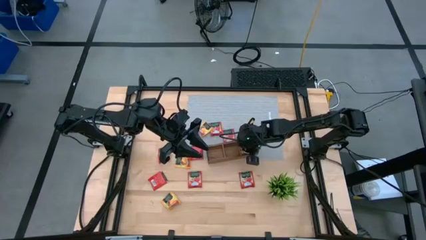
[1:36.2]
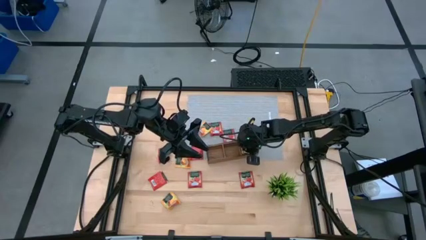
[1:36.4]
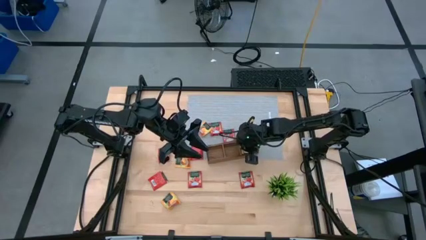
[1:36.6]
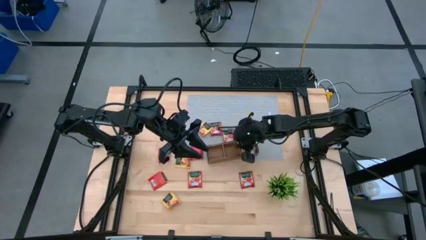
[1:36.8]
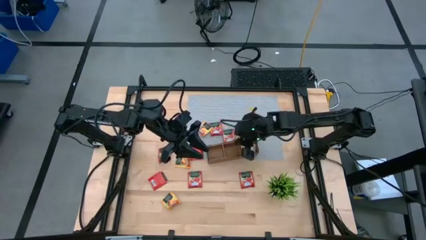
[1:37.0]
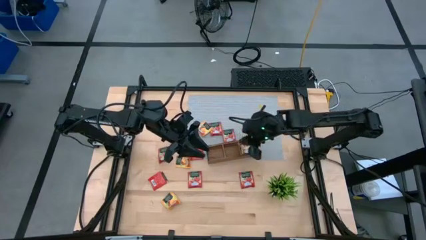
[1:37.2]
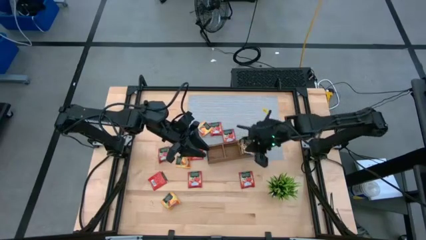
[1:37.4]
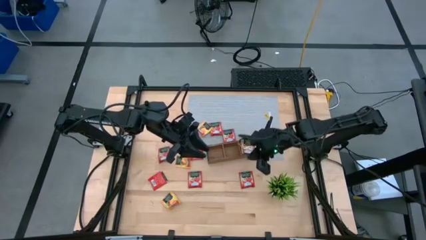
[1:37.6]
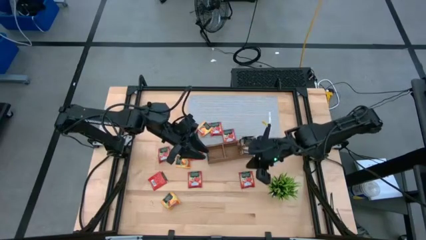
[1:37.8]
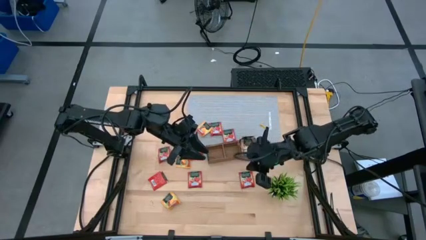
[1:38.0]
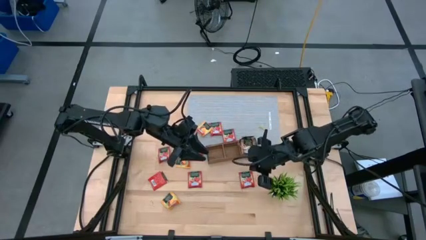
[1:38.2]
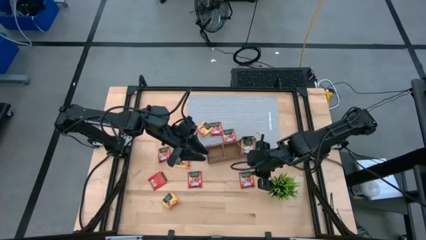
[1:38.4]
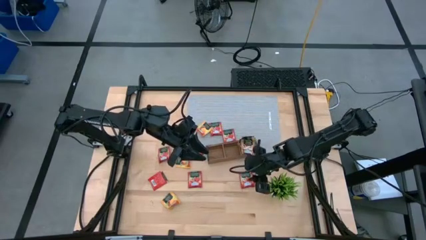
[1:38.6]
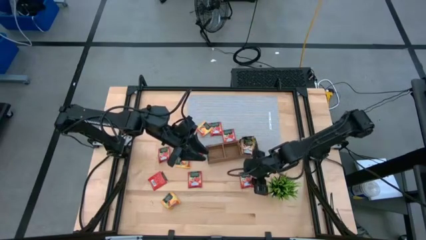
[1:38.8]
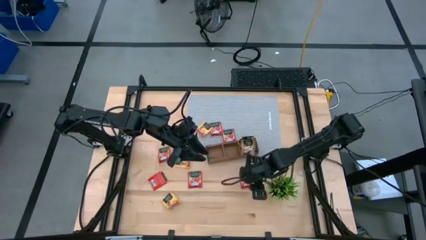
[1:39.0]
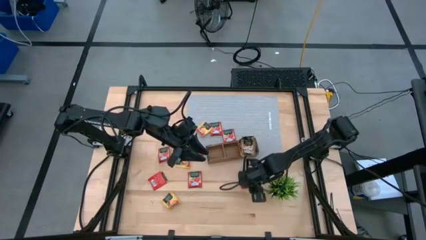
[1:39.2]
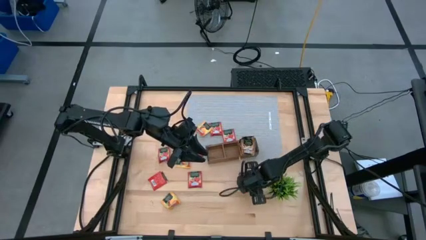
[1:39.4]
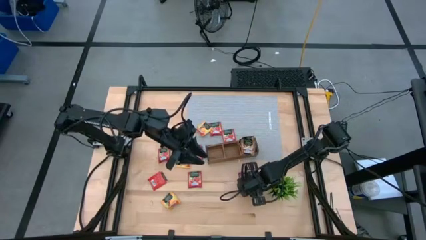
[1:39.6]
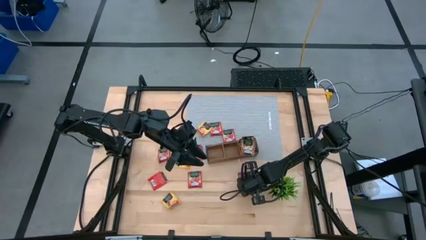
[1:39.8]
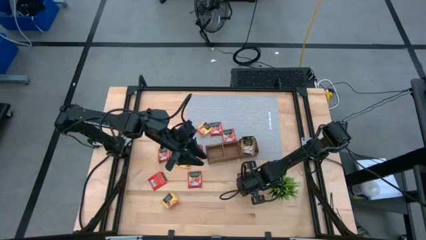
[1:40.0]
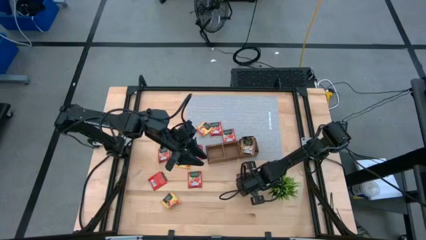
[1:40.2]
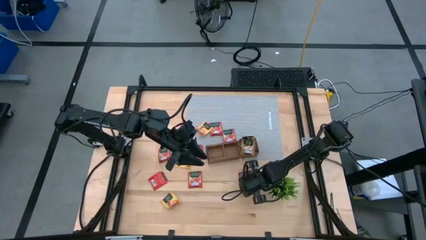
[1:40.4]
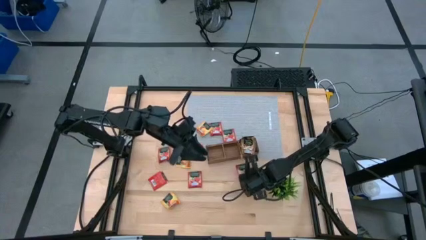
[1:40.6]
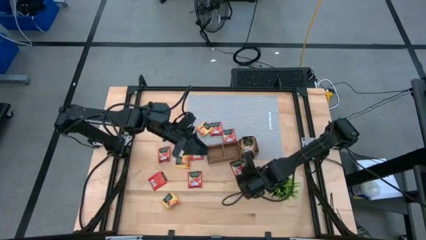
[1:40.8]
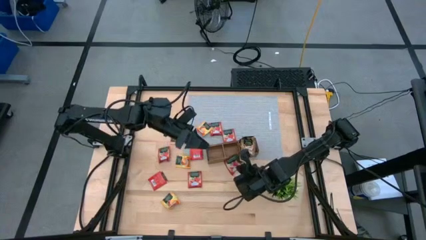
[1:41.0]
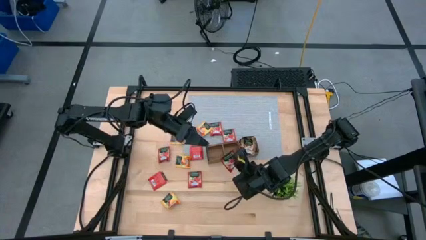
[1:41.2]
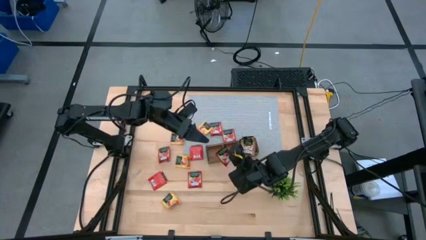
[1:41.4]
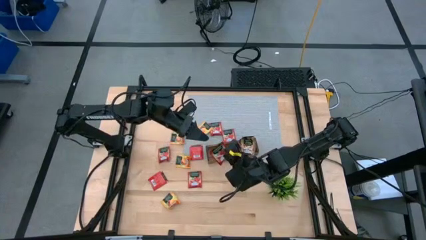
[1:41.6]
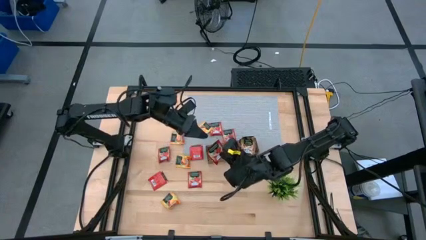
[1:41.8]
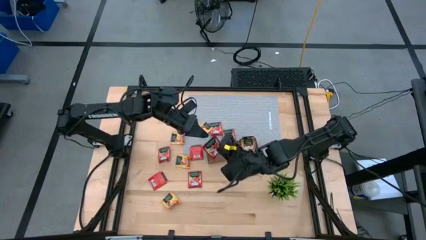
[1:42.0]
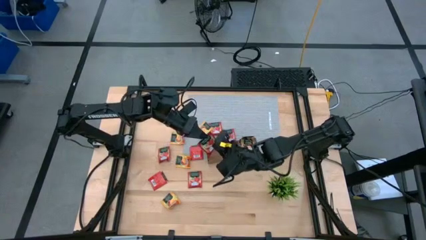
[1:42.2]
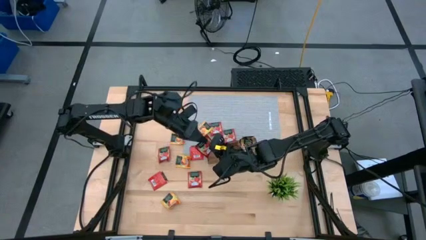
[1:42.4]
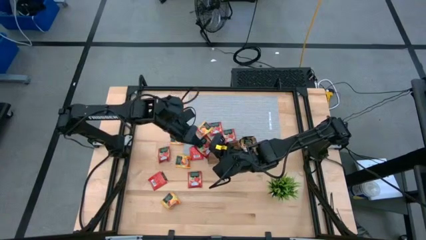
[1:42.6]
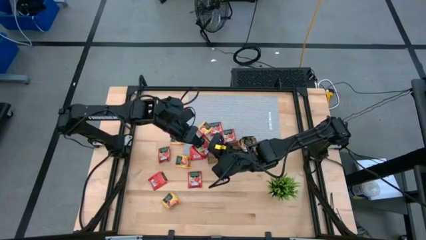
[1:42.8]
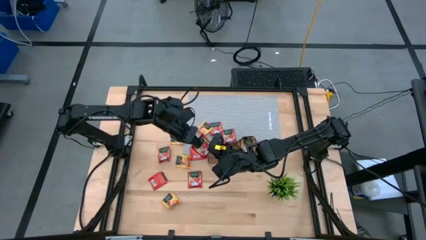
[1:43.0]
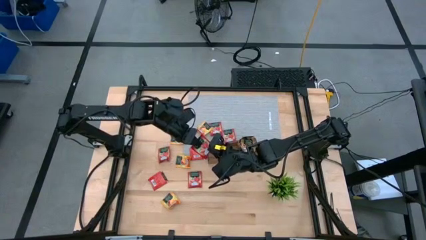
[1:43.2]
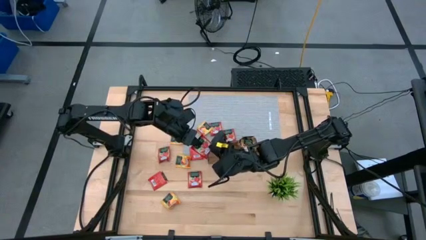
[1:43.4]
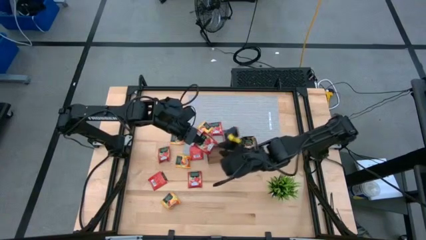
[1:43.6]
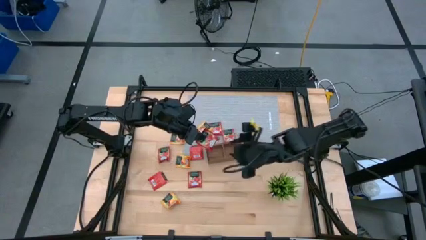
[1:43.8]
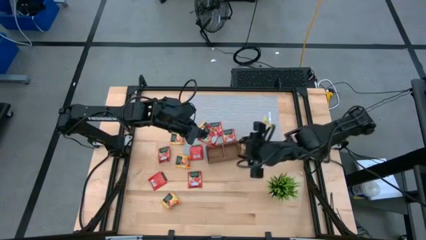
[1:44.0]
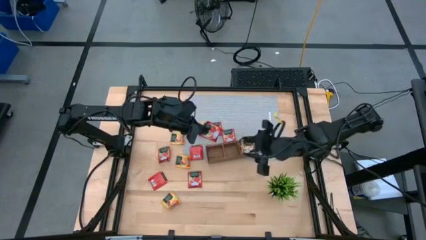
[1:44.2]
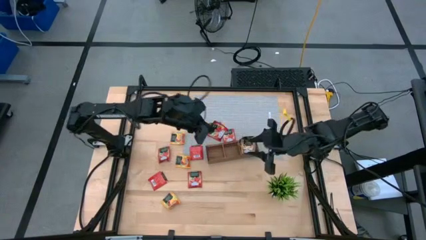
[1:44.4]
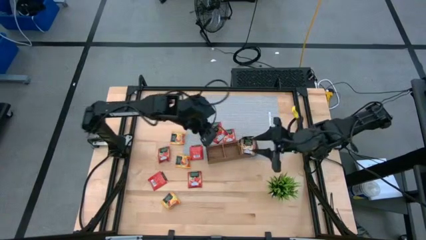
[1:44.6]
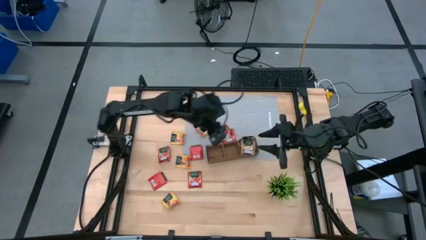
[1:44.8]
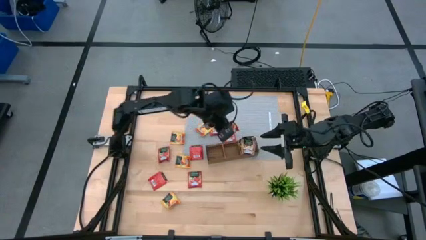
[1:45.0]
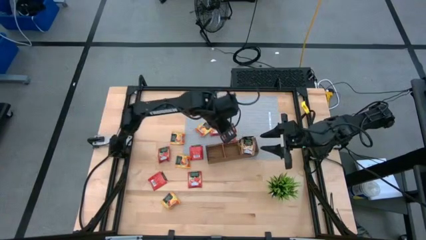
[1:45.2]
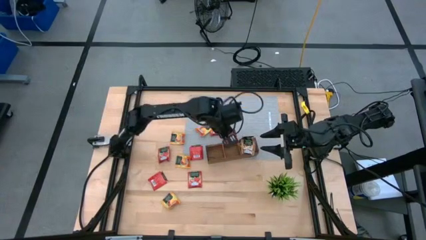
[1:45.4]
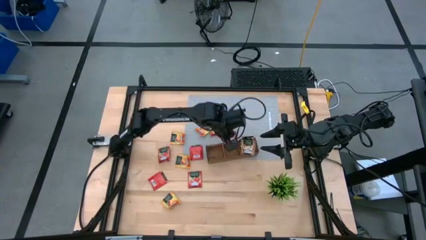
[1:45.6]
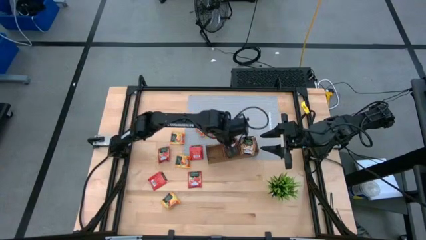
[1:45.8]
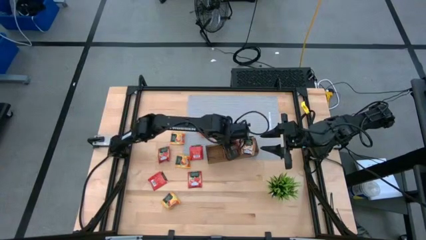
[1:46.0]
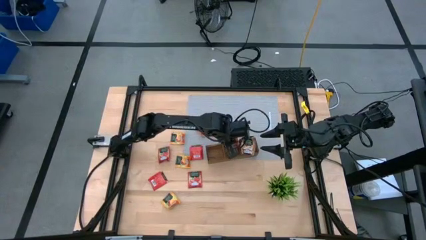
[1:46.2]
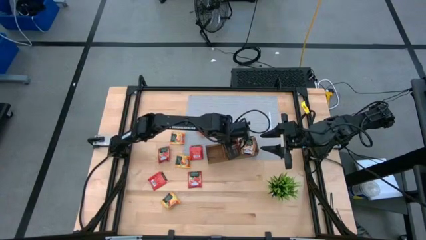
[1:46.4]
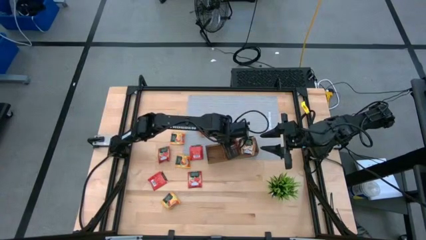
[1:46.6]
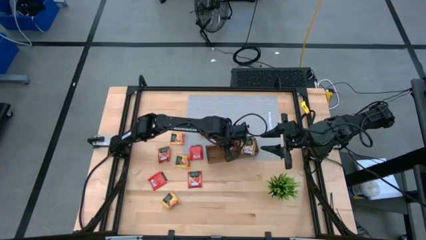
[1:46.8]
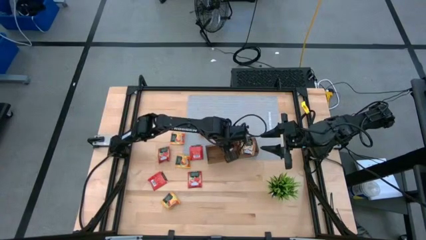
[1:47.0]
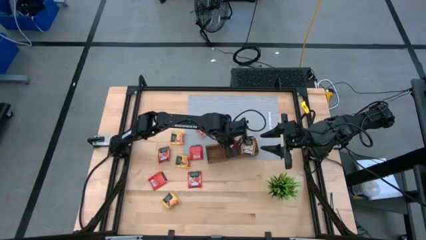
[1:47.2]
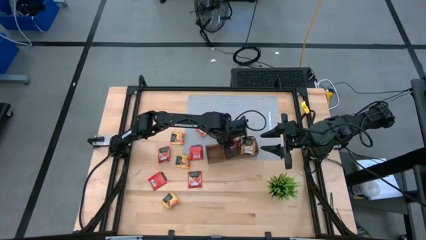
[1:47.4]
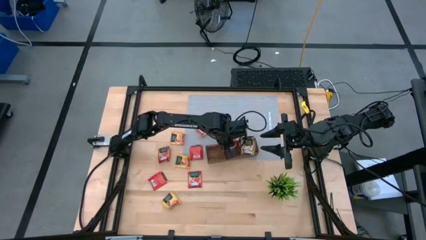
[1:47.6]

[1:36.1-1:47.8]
Task: Pick & Place Tea
Put the red tea bag into the middle section of the wooden organizer
